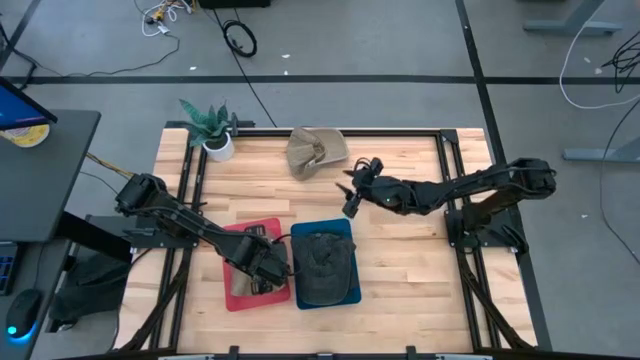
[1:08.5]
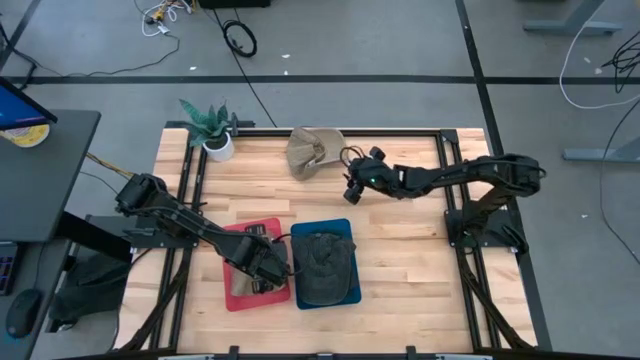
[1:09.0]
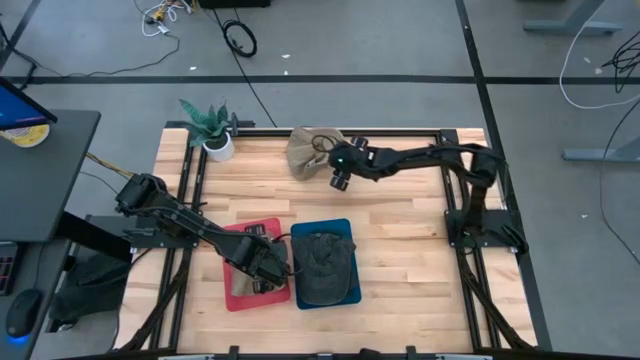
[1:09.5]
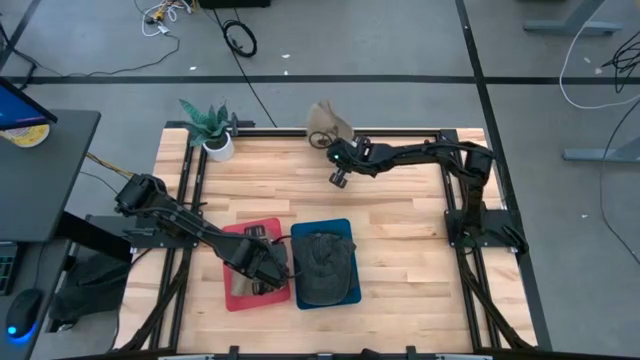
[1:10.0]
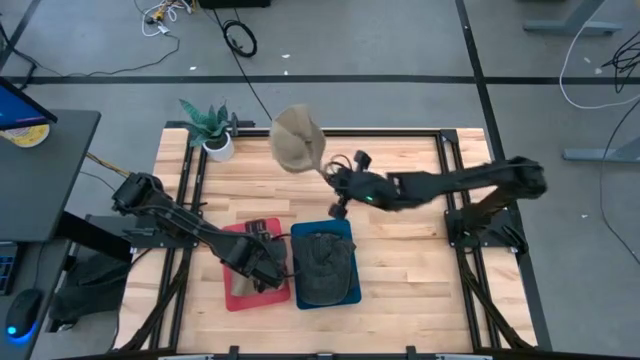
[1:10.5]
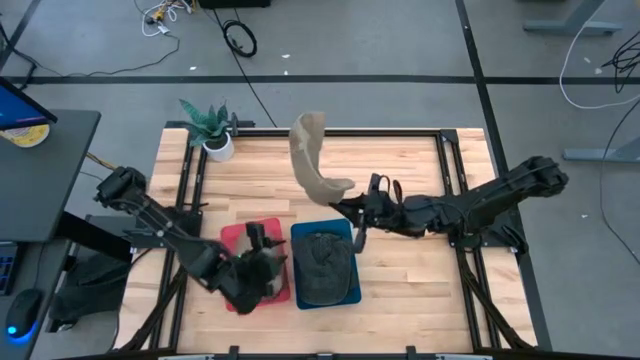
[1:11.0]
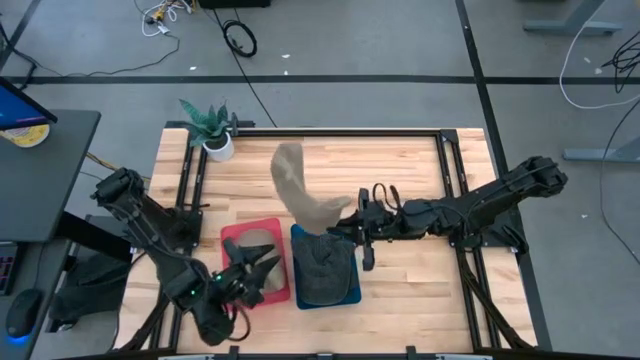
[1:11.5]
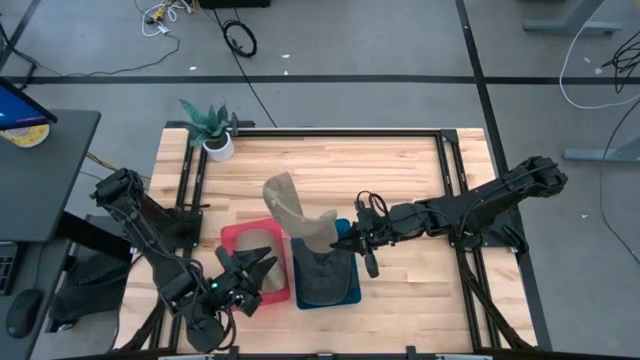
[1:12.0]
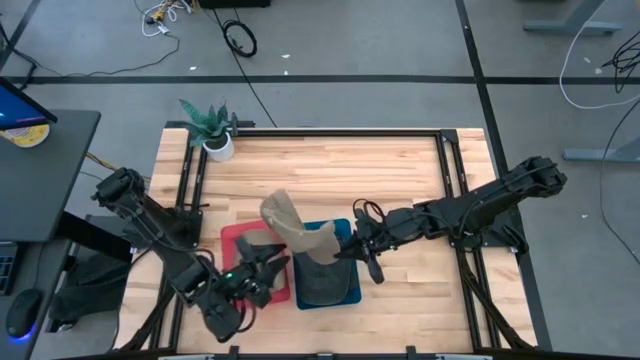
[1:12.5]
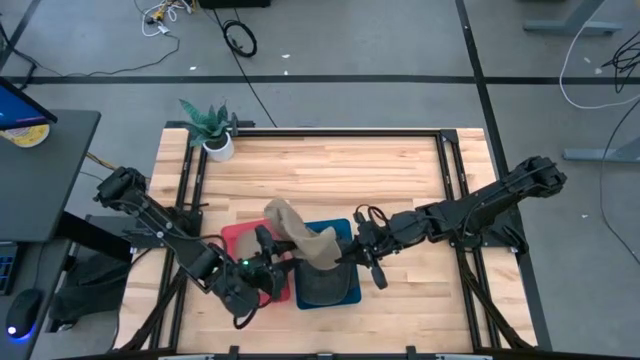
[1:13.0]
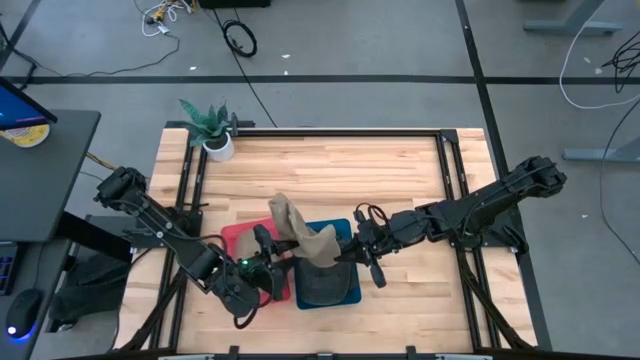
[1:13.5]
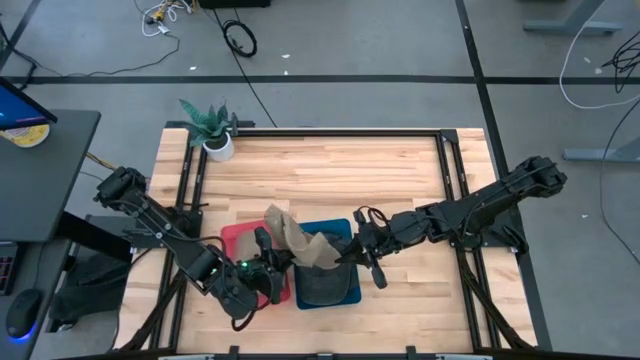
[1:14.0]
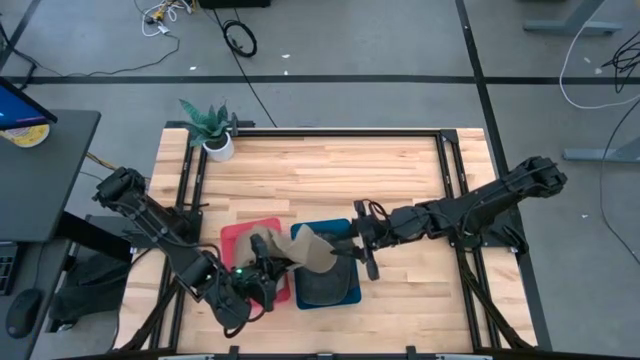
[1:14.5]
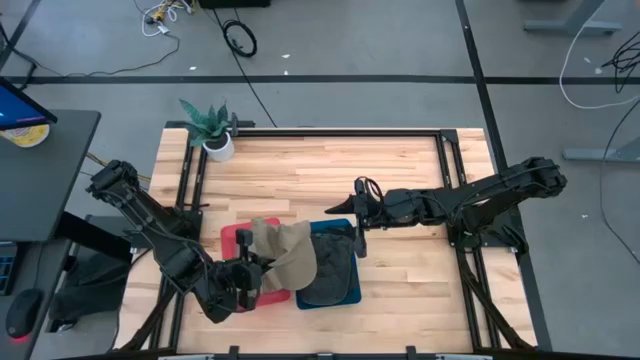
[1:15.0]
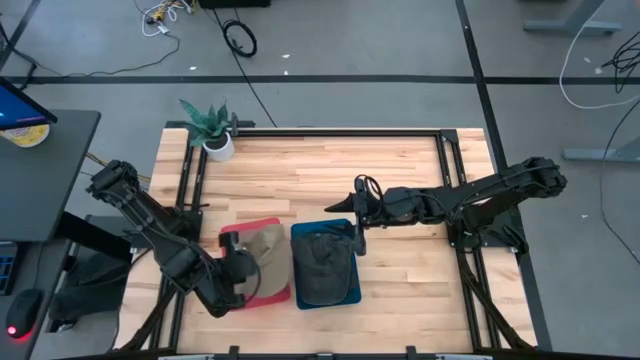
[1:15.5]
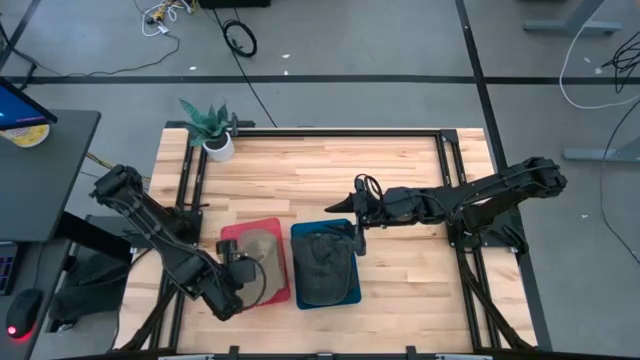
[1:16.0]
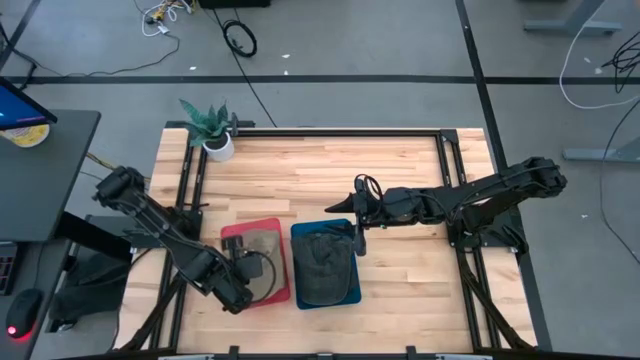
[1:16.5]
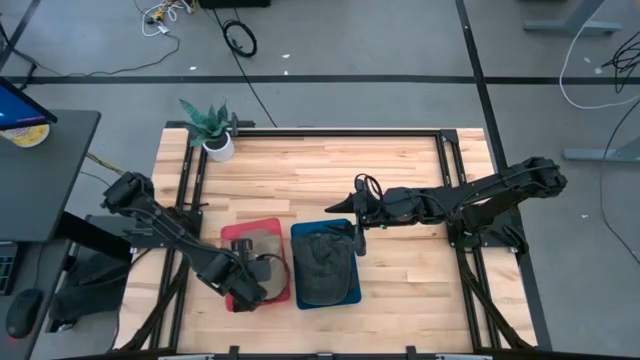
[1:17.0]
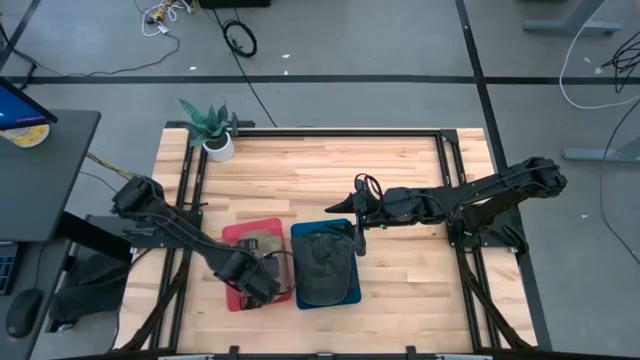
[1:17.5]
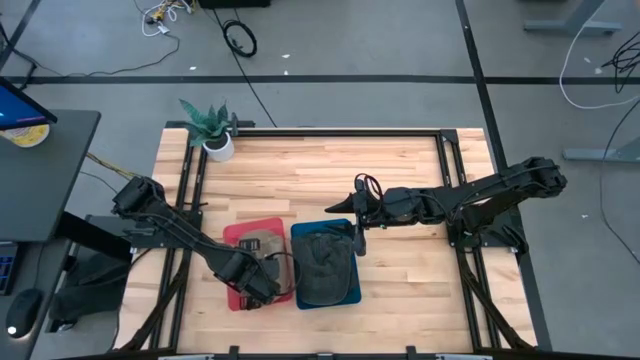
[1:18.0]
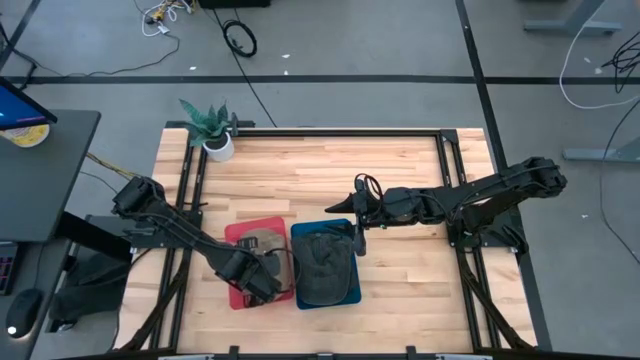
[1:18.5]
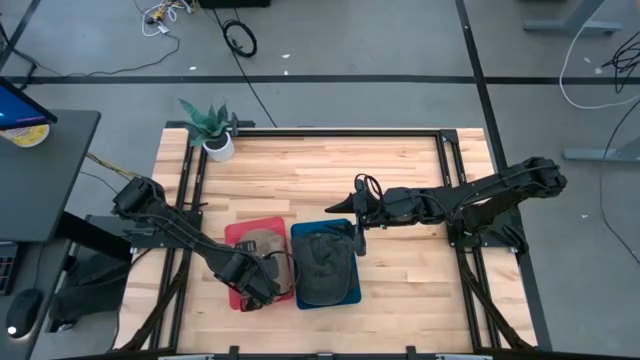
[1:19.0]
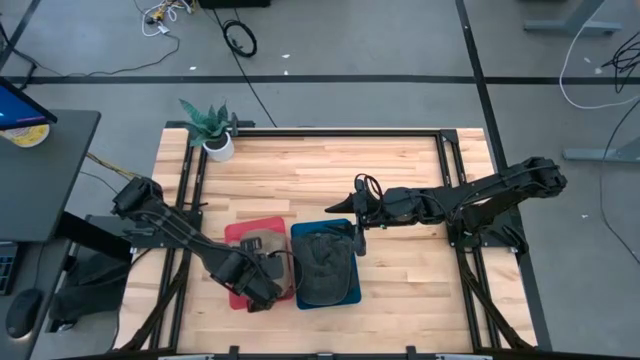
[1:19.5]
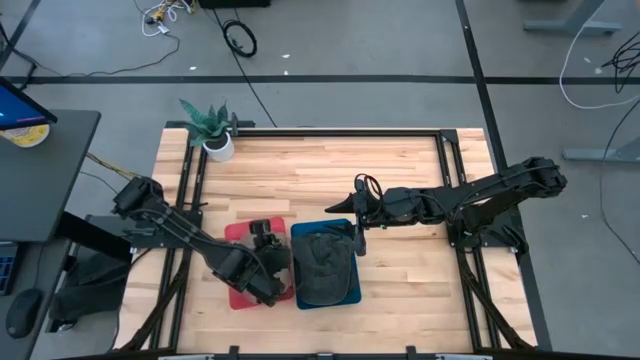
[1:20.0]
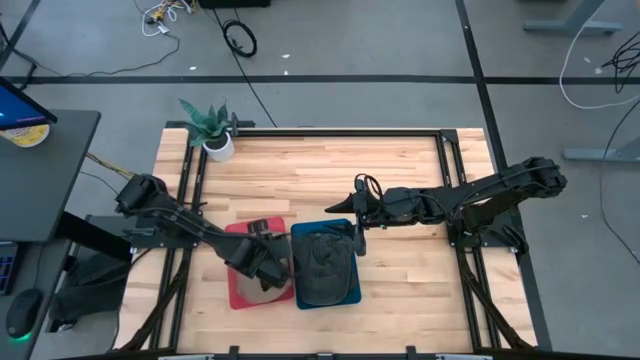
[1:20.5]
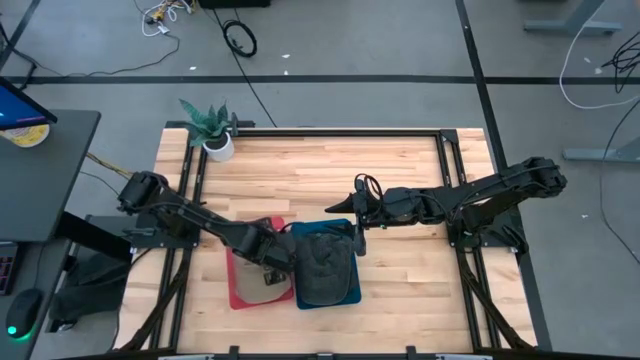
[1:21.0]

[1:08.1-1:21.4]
Task: Pick & Place hat
Put the brown cap into the red bin

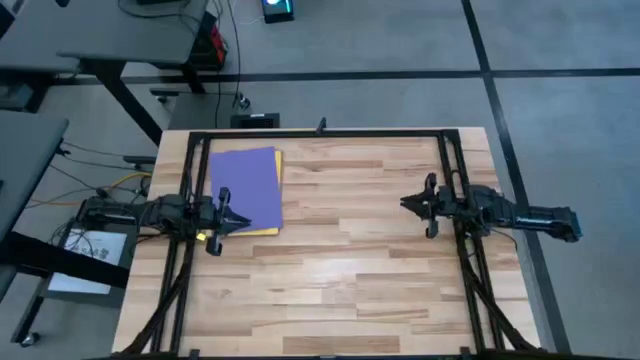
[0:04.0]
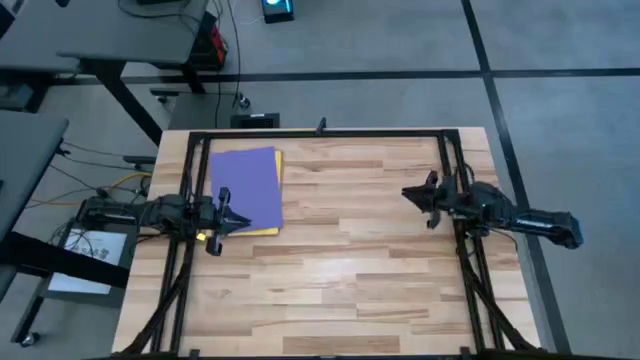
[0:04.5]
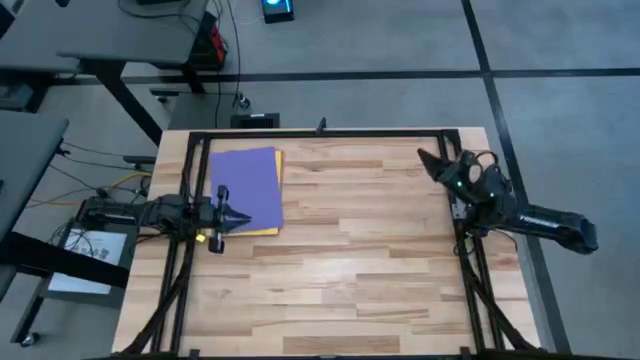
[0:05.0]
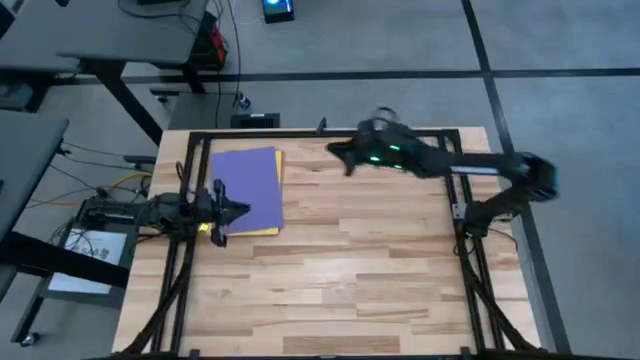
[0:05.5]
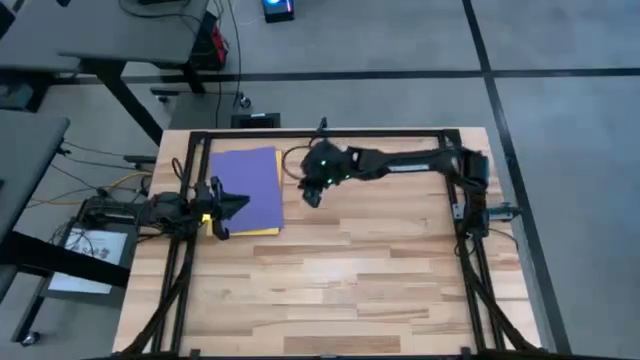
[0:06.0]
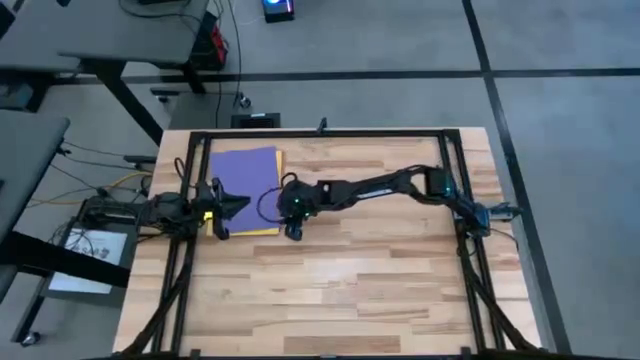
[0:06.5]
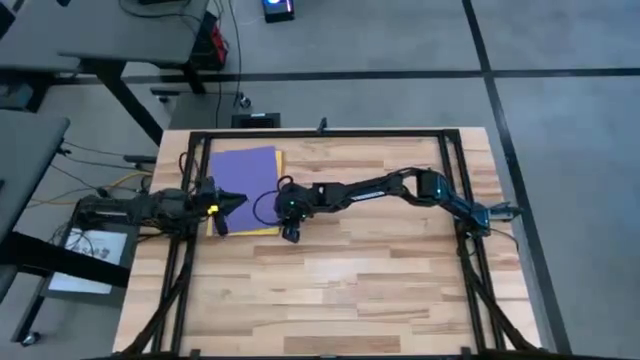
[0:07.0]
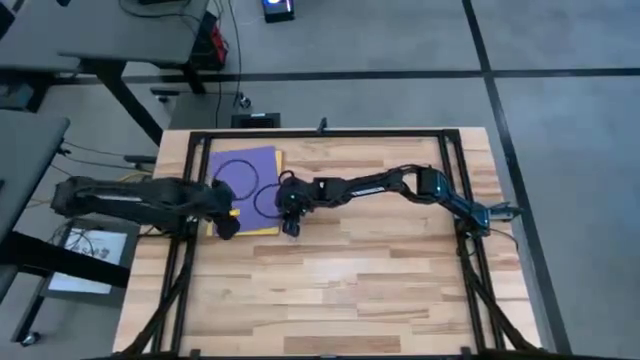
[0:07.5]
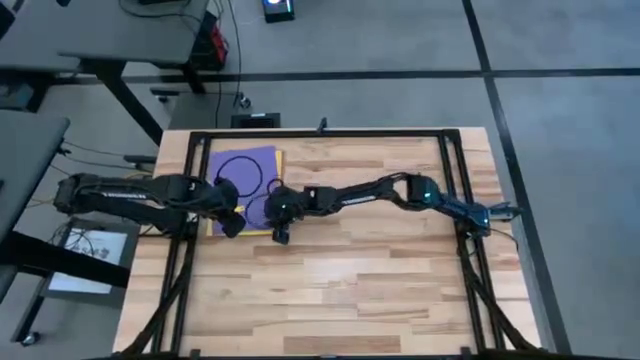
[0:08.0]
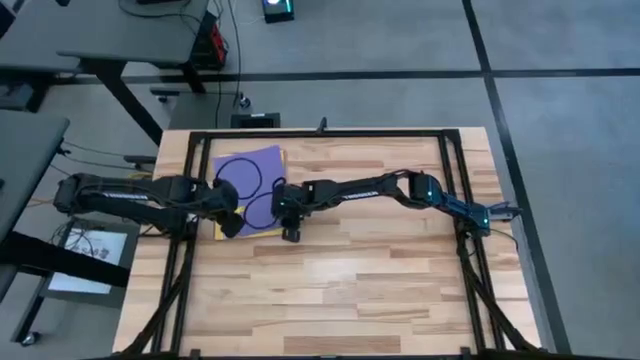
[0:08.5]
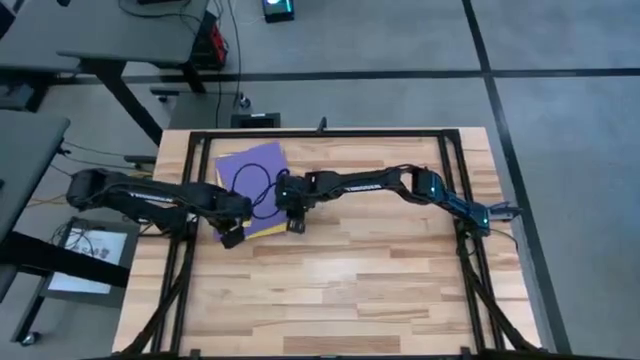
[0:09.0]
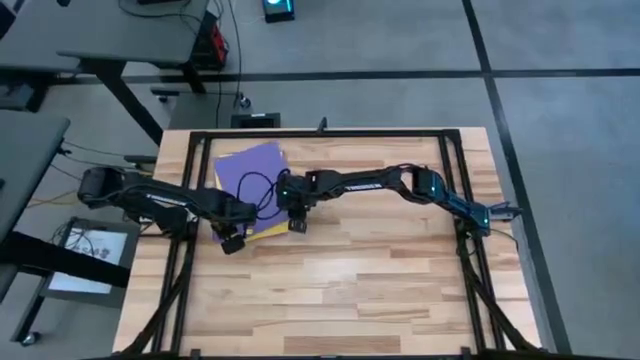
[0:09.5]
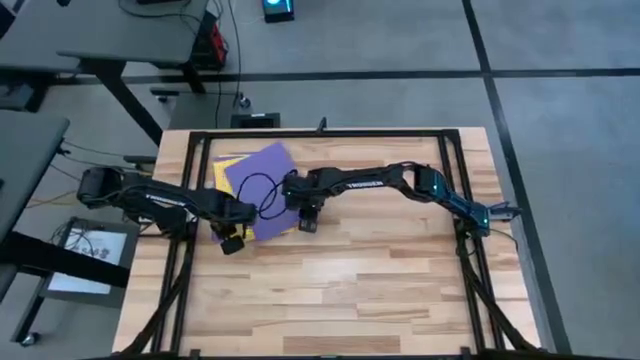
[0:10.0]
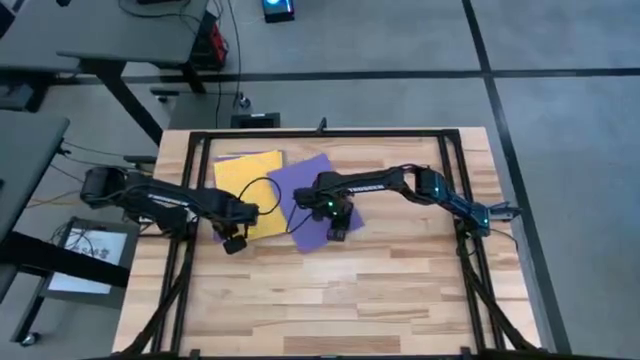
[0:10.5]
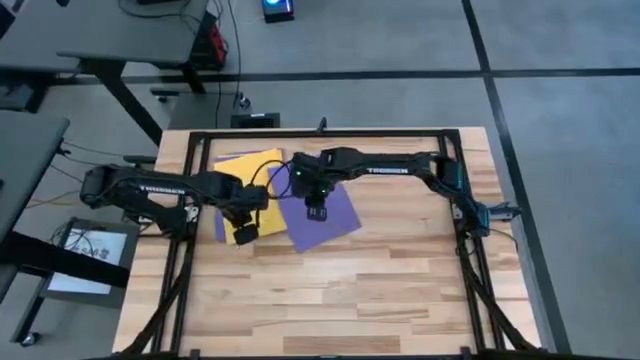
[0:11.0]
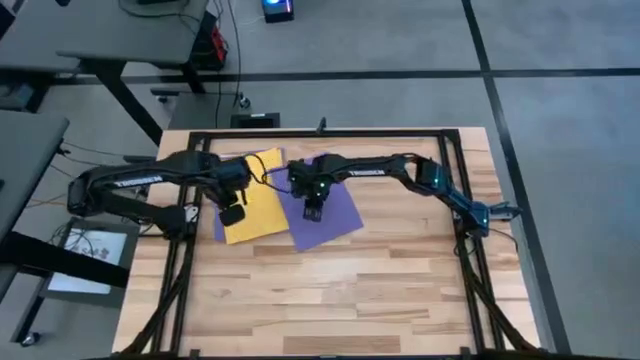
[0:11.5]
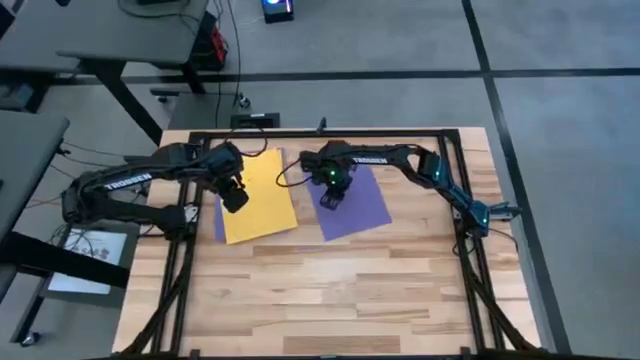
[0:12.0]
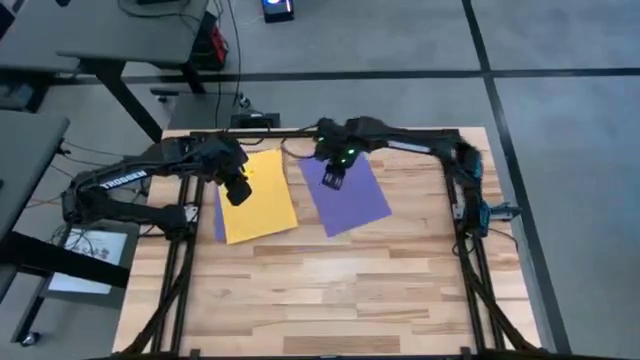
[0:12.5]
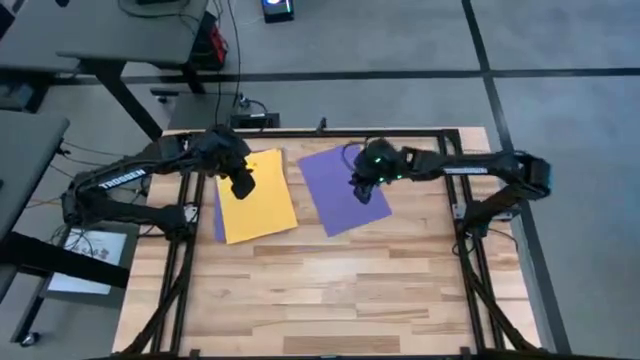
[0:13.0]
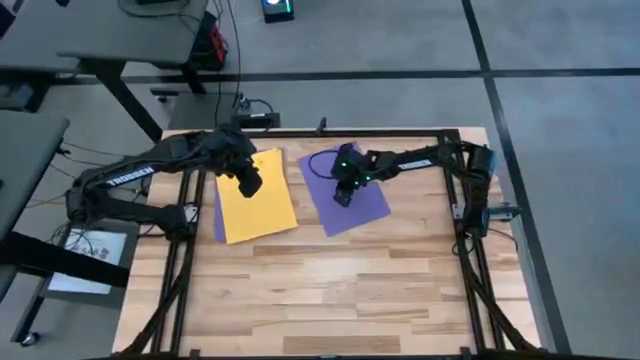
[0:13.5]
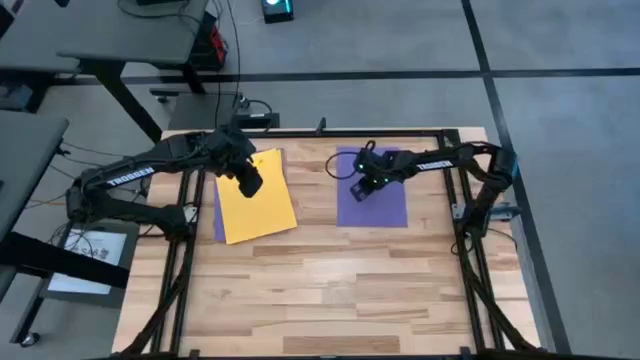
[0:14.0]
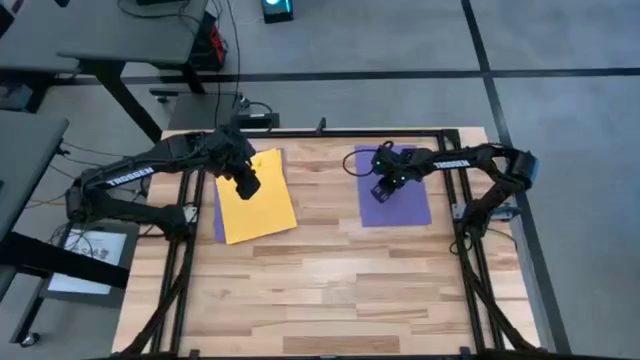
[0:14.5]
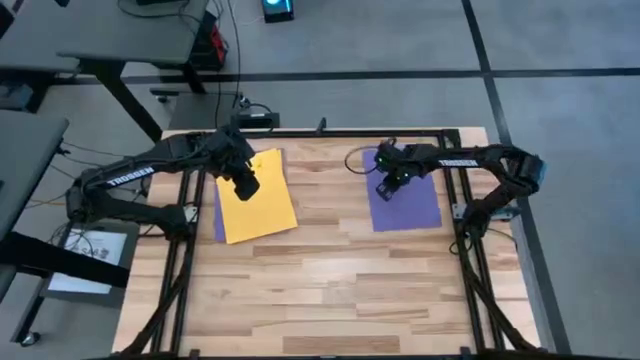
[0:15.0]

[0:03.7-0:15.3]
Task: Organize paper
Put the purple paper into the top right of the table
